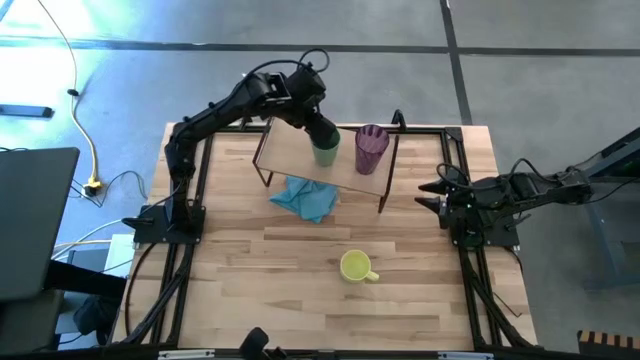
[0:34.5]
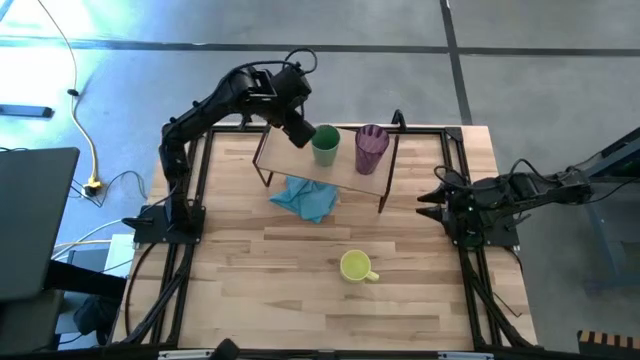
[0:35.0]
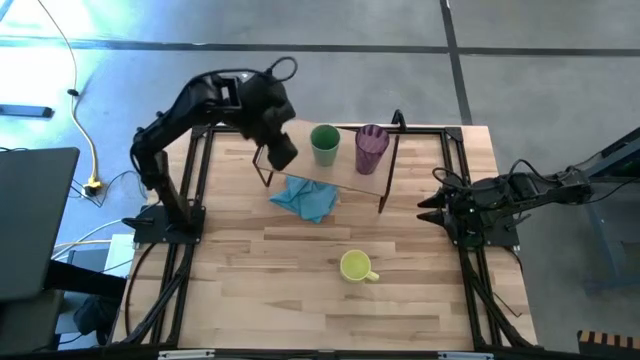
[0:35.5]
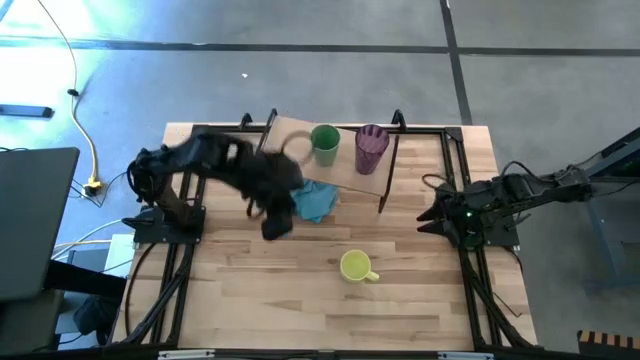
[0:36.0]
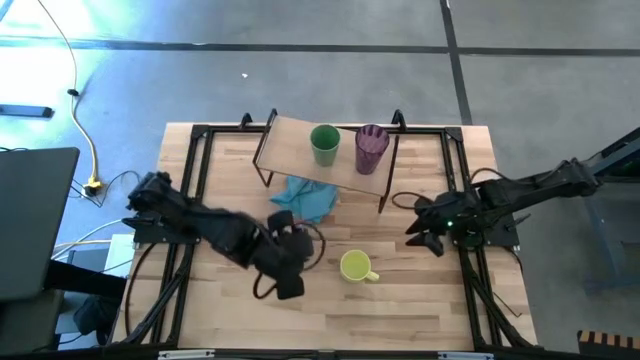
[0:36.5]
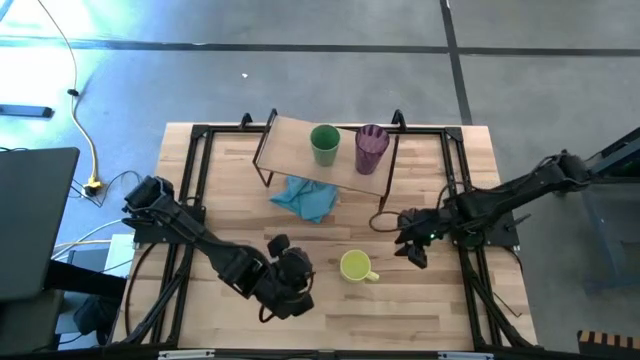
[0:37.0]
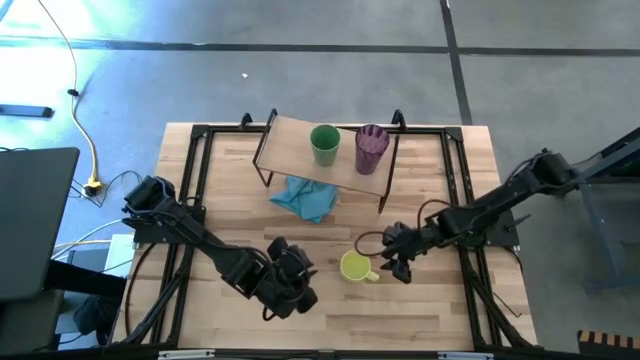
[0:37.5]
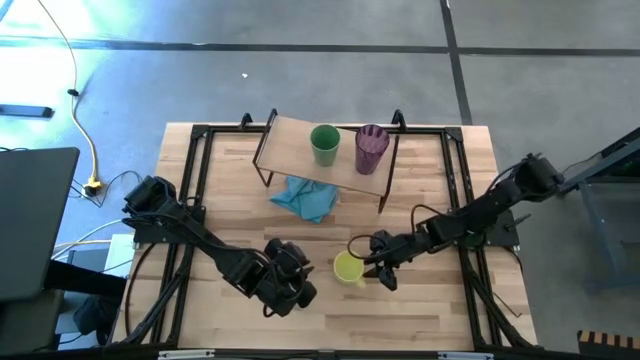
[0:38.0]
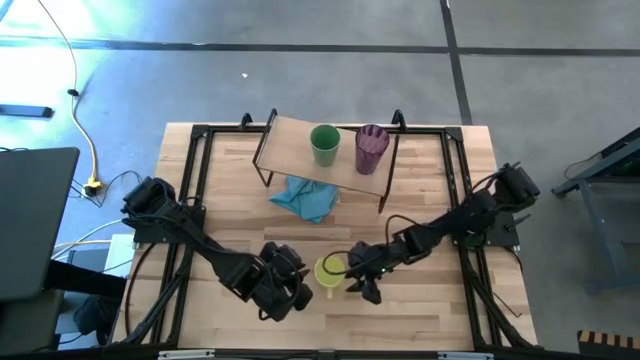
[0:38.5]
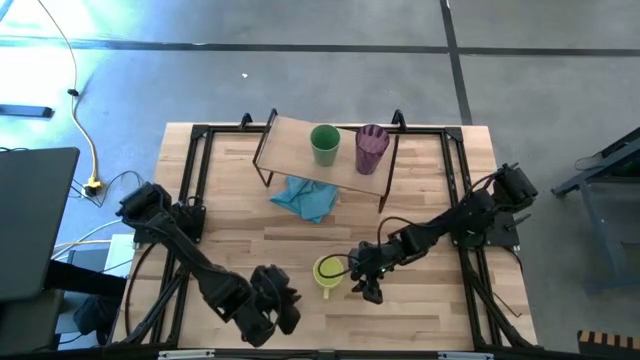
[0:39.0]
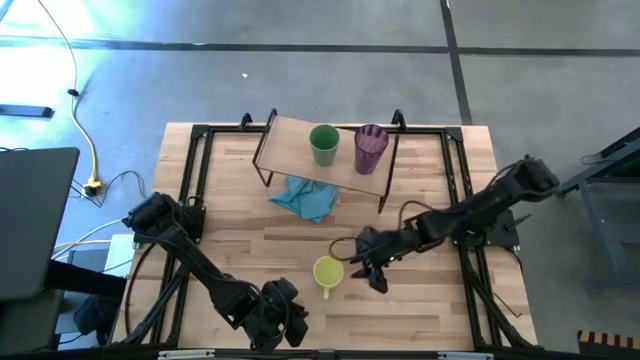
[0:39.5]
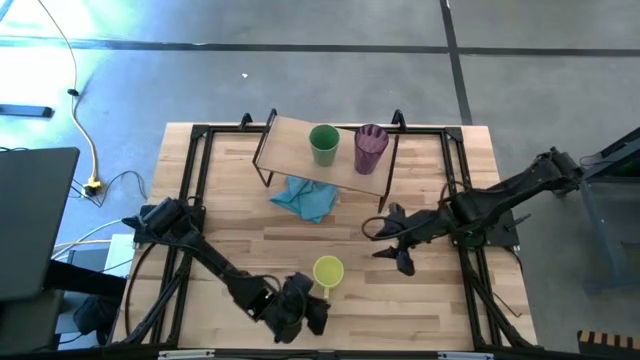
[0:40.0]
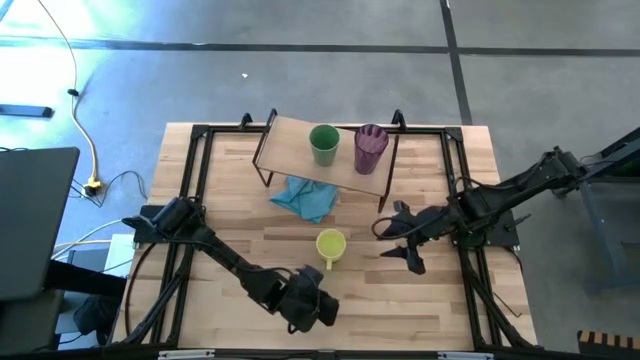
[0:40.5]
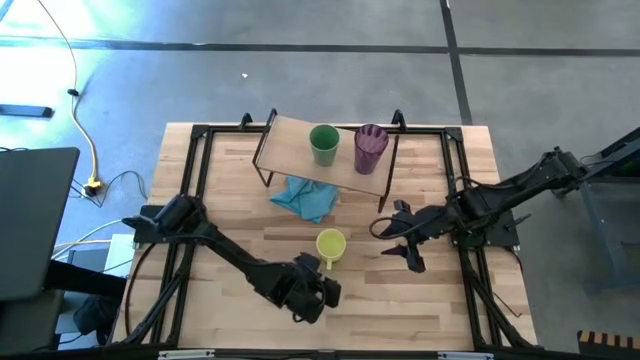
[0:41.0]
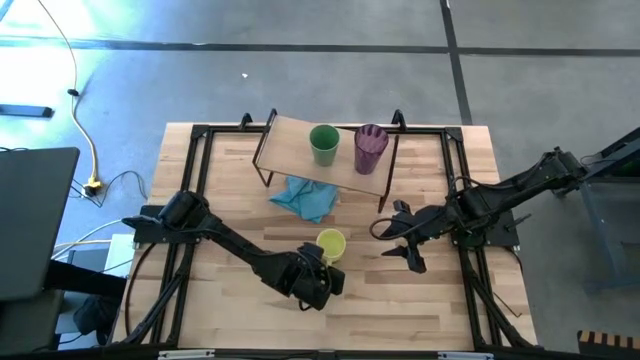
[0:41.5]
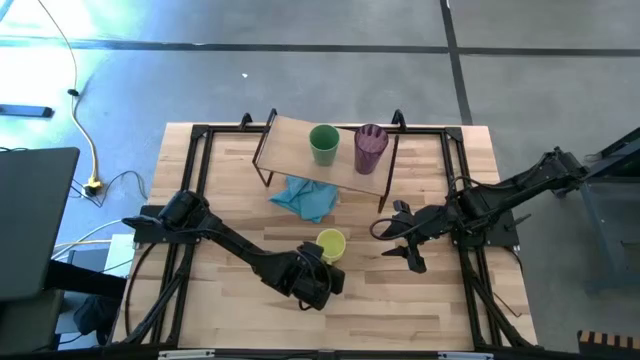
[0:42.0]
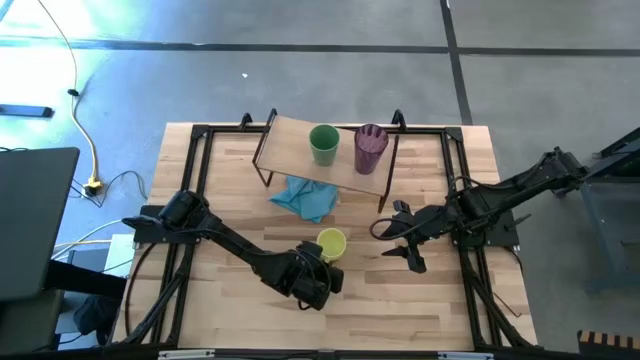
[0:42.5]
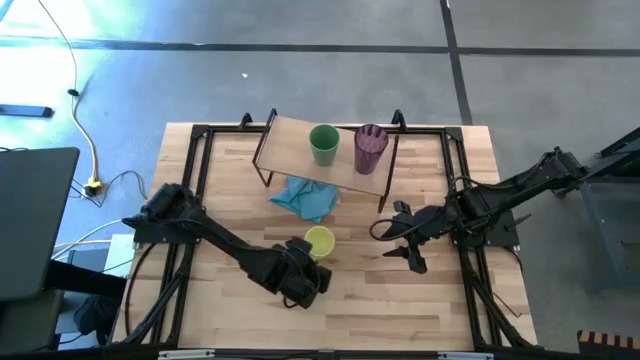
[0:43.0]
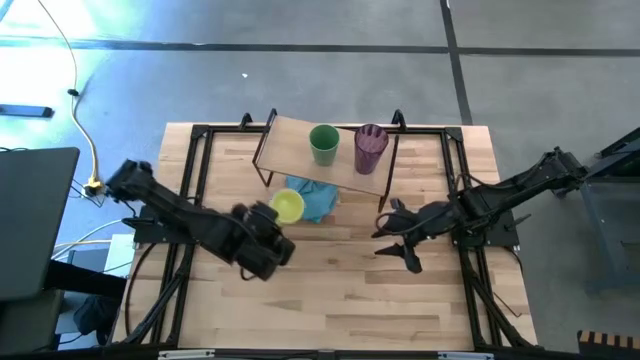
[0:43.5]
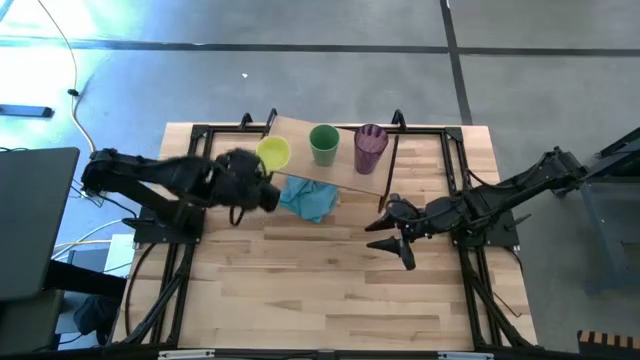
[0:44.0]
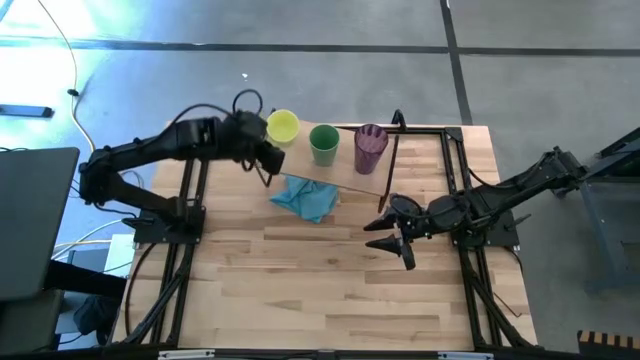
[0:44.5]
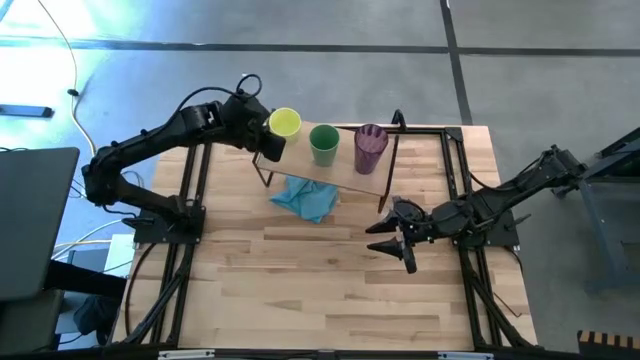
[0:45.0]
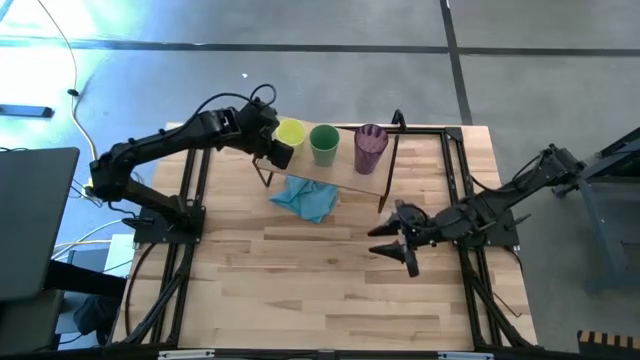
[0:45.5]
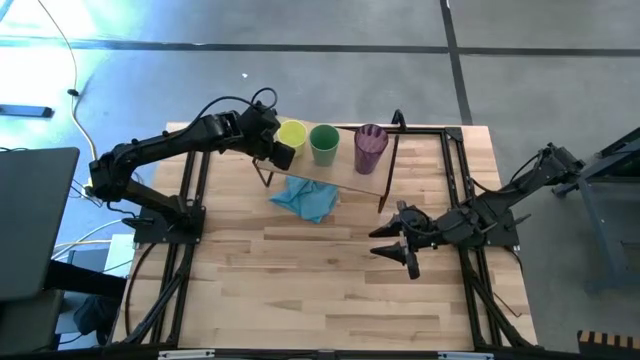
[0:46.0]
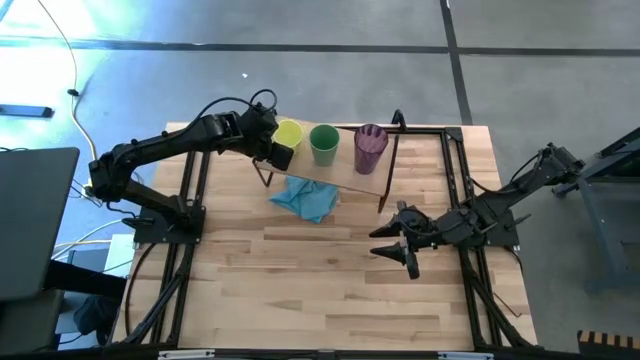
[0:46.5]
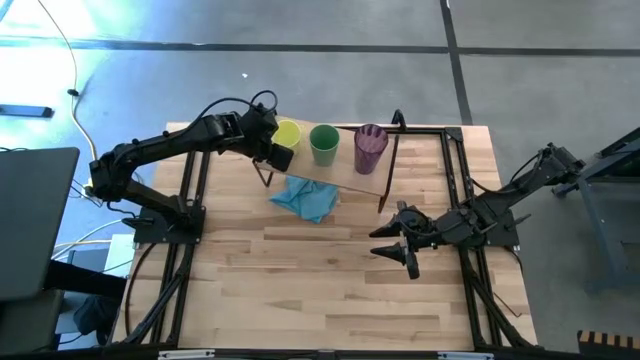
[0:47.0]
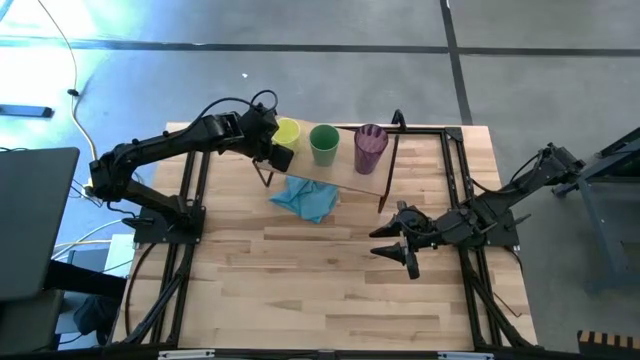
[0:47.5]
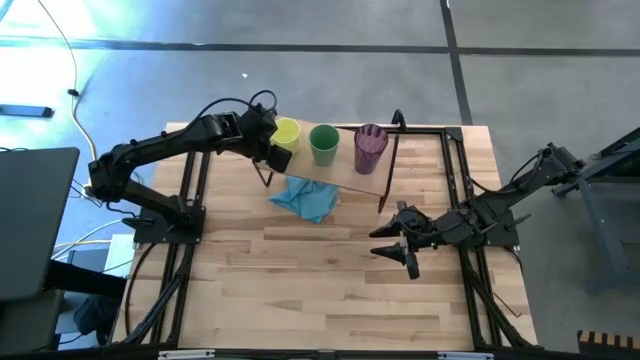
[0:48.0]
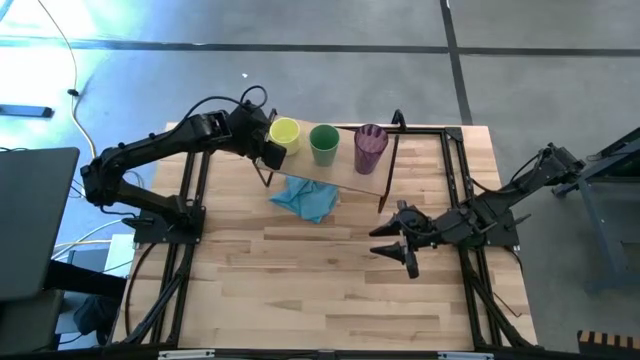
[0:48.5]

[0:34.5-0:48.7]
Task: Stack small to large cups/mugs on shelf
Put the yellow mug on the shelf

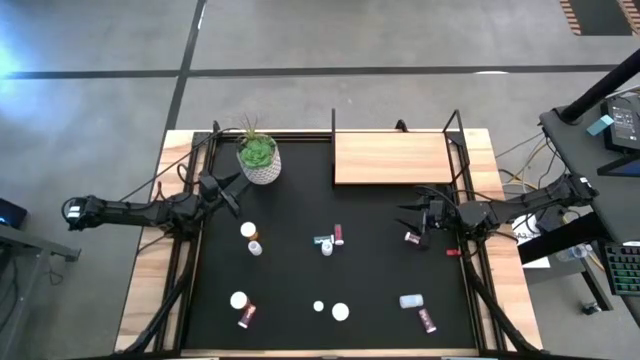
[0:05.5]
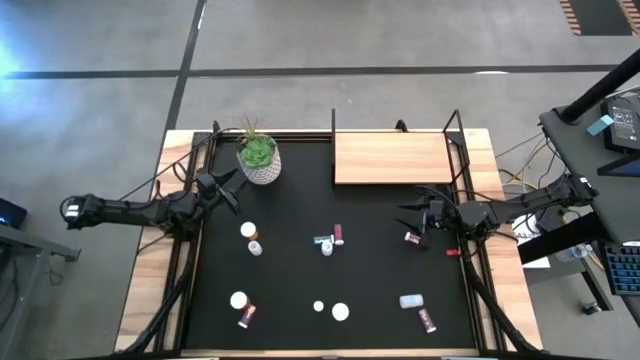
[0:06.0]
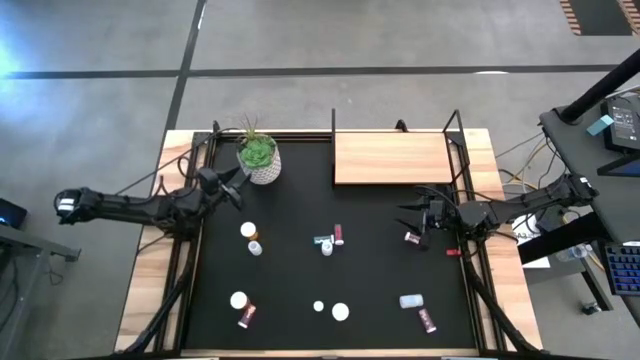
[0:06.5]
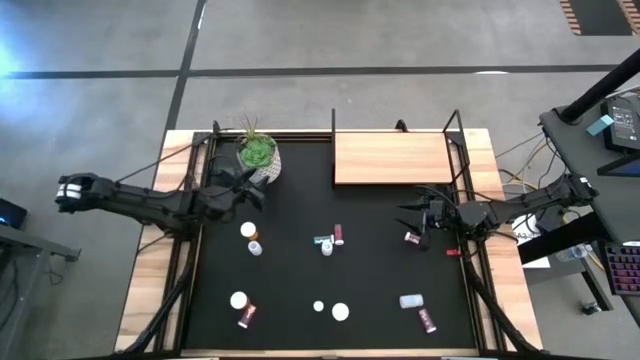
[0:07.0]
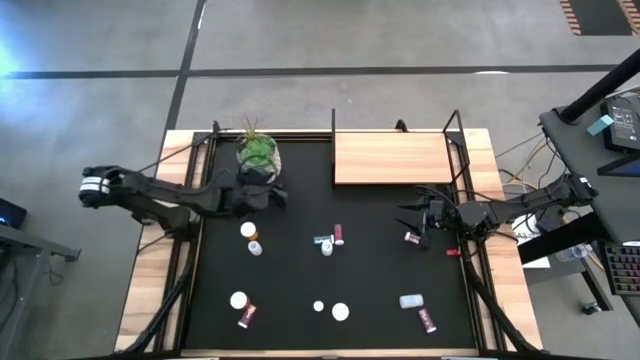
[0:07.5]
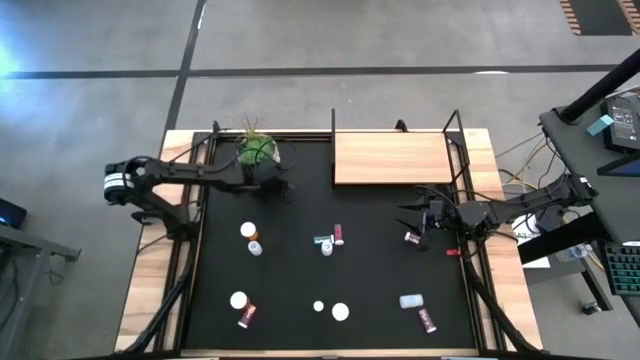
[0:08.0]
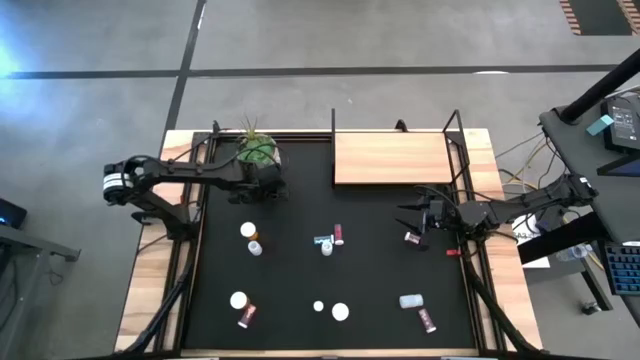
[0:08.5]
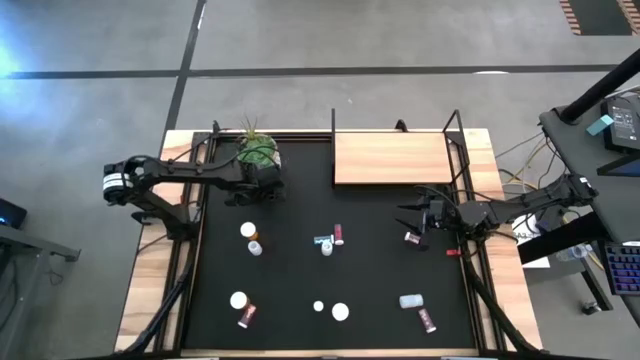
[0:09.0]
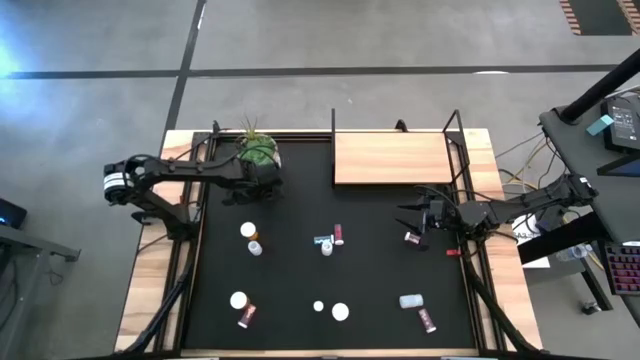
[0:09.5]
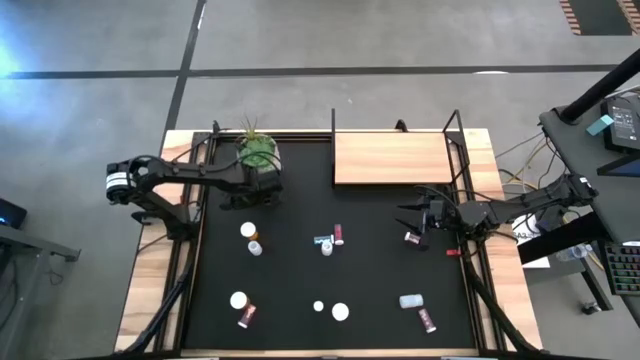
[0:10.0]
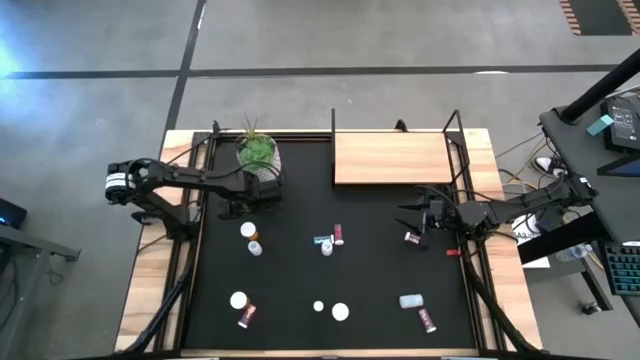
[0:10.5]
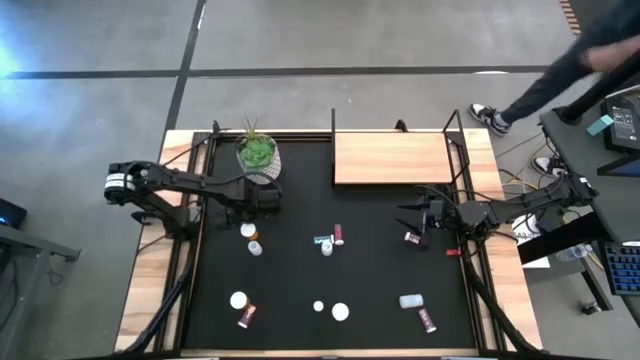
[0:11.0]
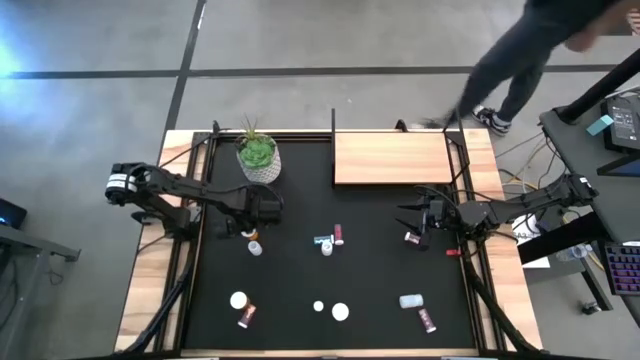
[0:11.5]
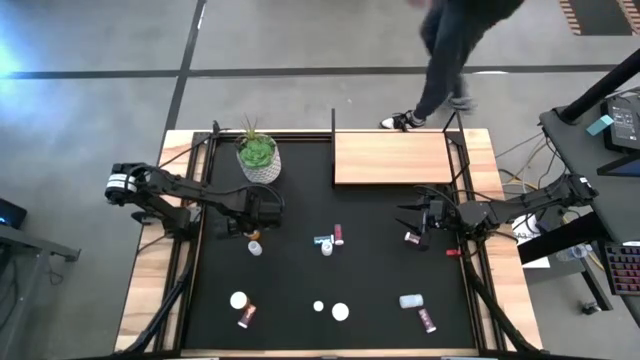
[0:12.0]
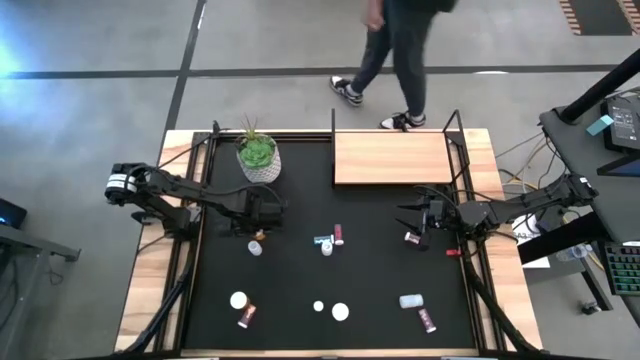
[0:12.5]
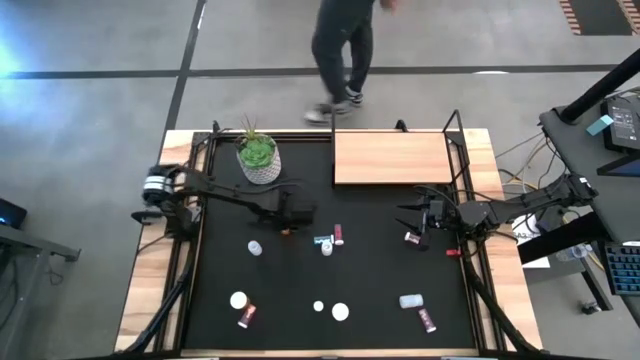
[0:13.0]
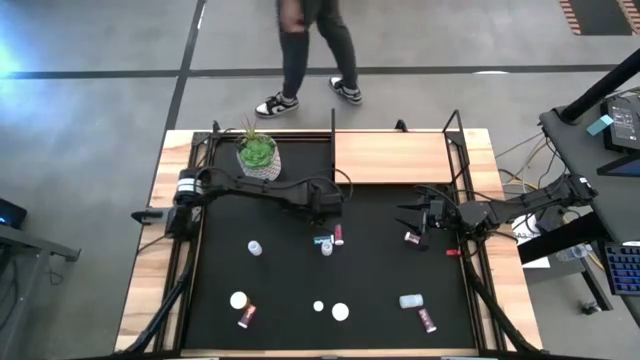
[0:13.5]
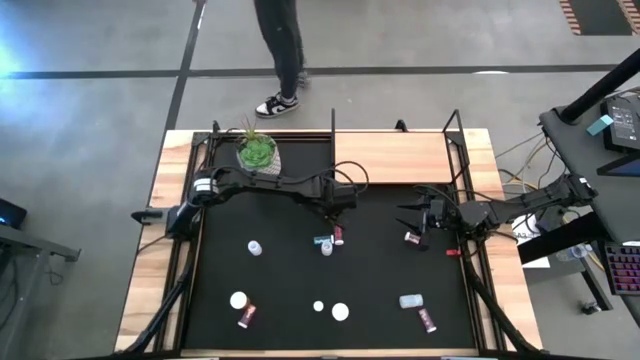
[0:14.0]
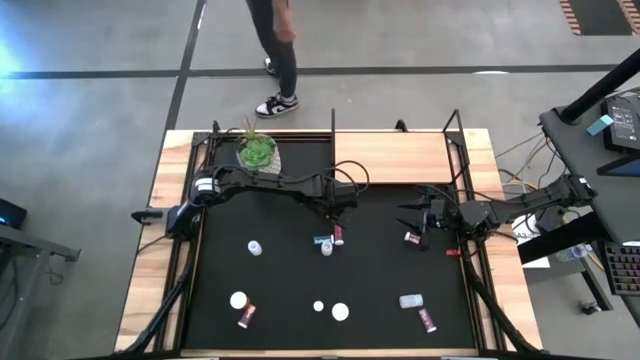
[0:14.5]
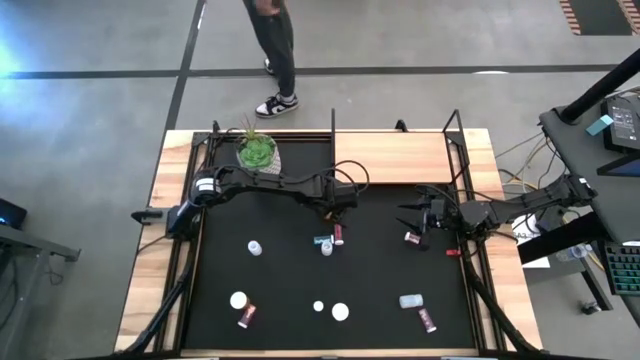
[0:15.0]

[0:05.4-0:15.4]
Task: Pick and place medicine bottles onto shelf by color
Move the top orange pill bottle to the center of the table
